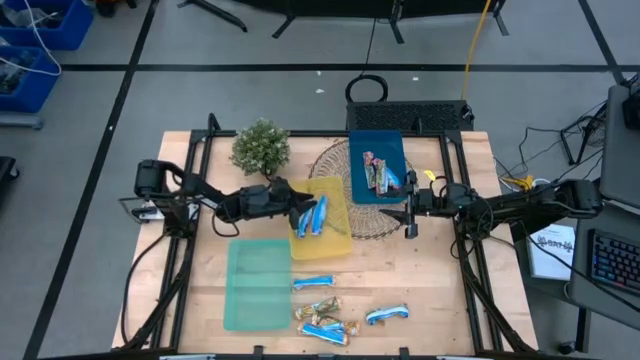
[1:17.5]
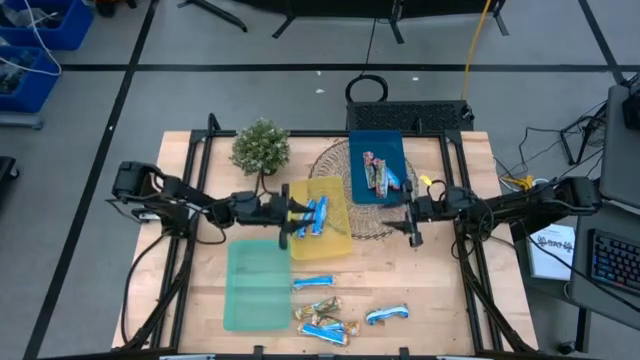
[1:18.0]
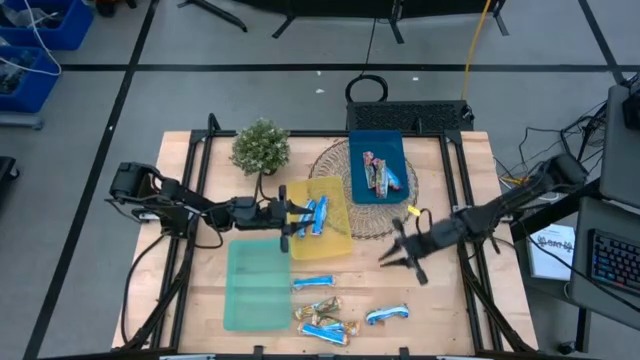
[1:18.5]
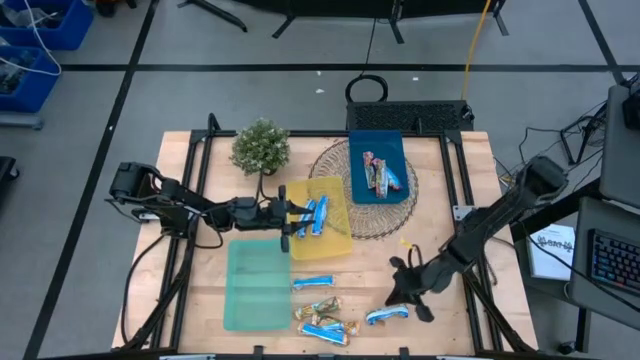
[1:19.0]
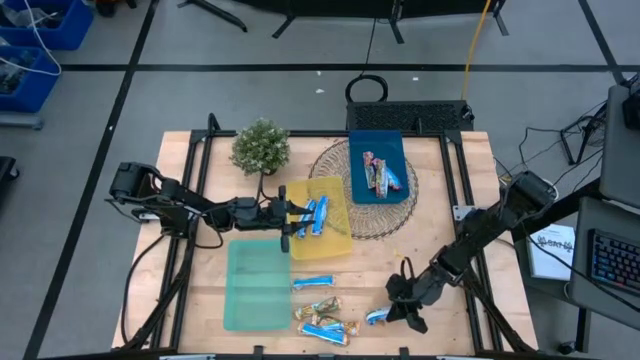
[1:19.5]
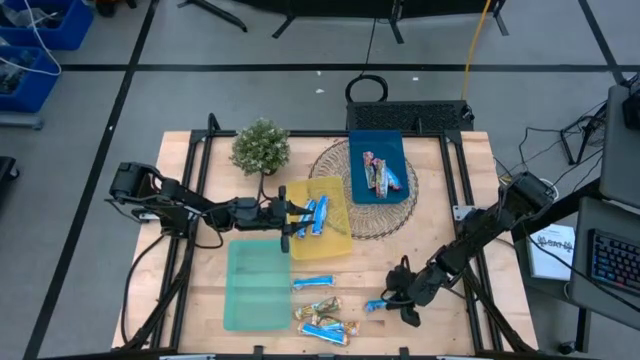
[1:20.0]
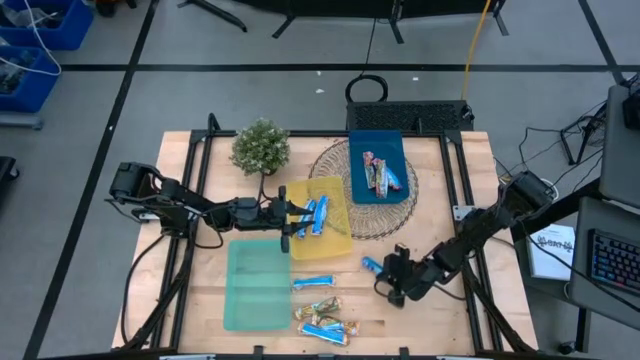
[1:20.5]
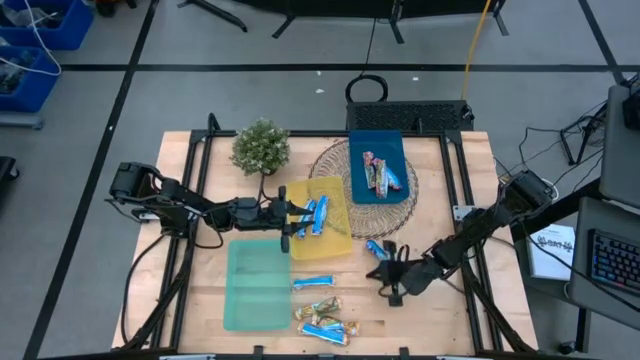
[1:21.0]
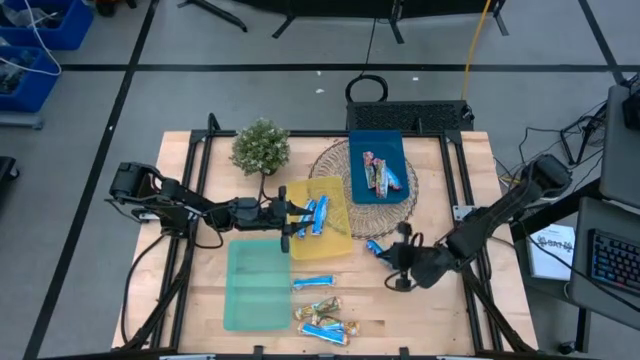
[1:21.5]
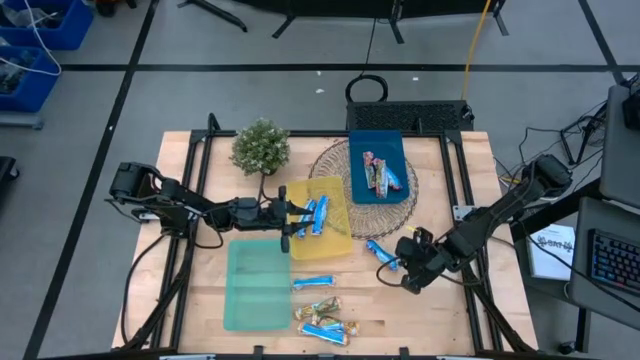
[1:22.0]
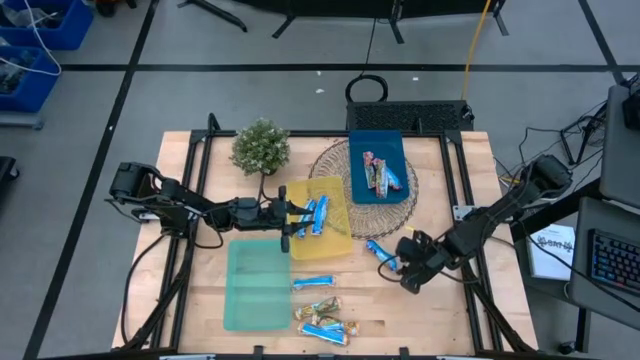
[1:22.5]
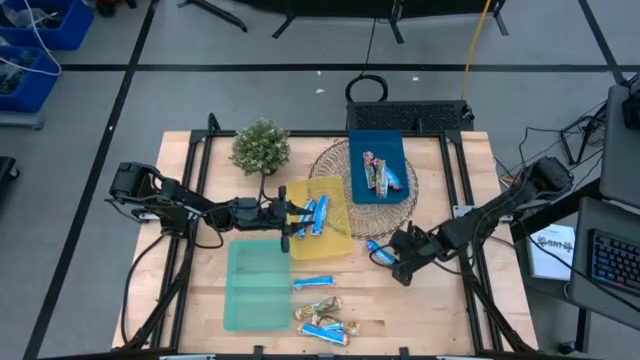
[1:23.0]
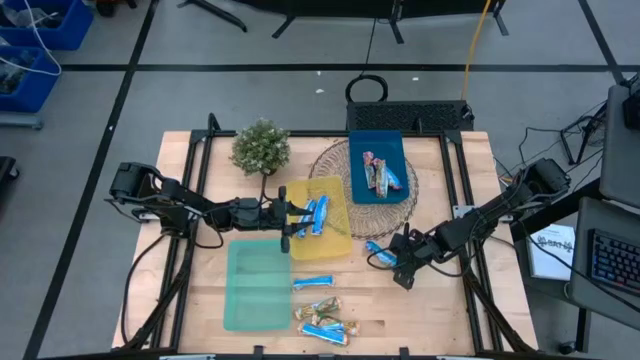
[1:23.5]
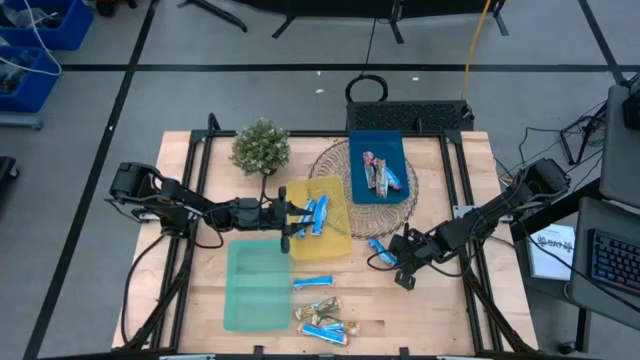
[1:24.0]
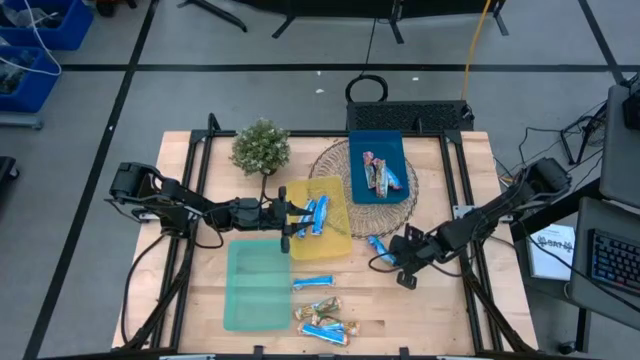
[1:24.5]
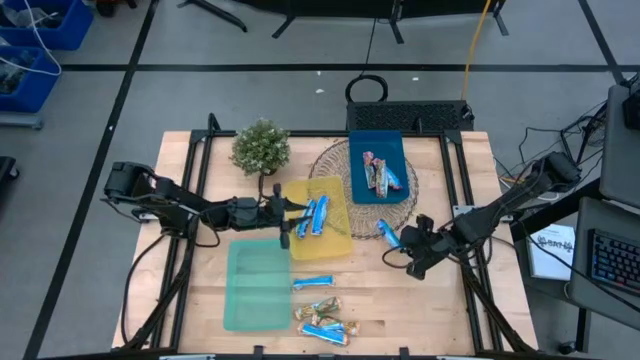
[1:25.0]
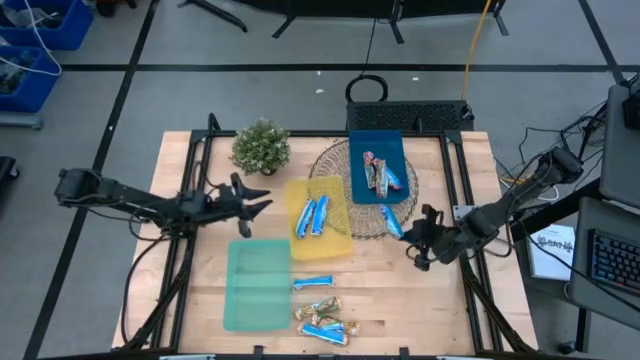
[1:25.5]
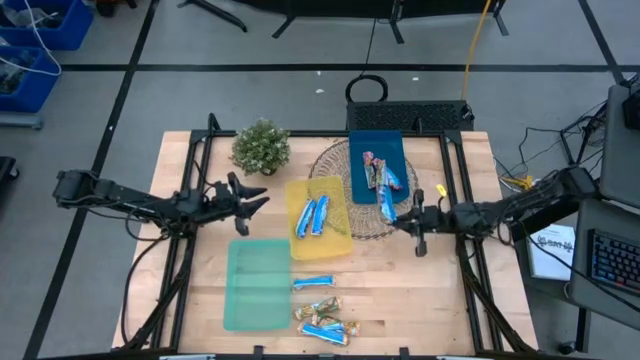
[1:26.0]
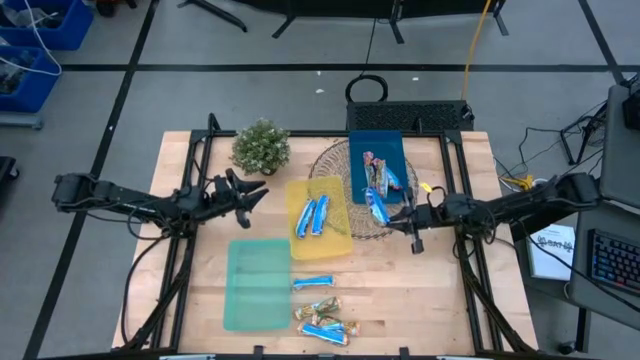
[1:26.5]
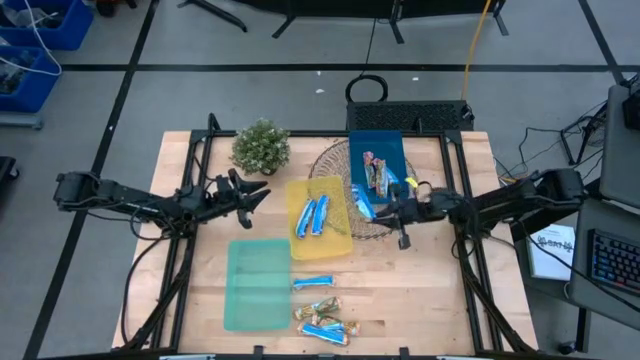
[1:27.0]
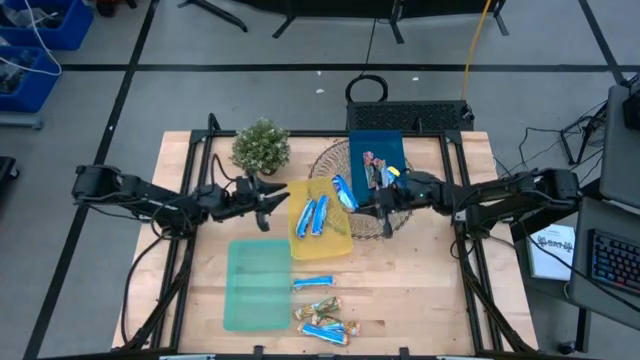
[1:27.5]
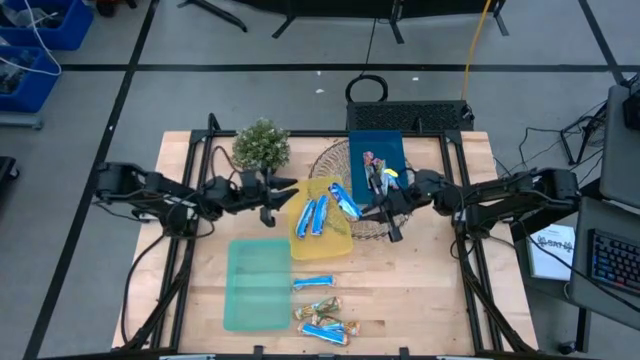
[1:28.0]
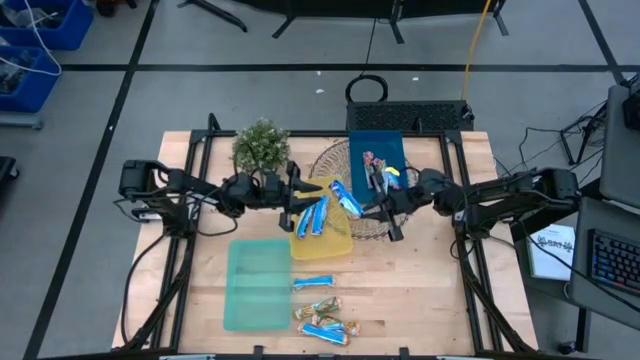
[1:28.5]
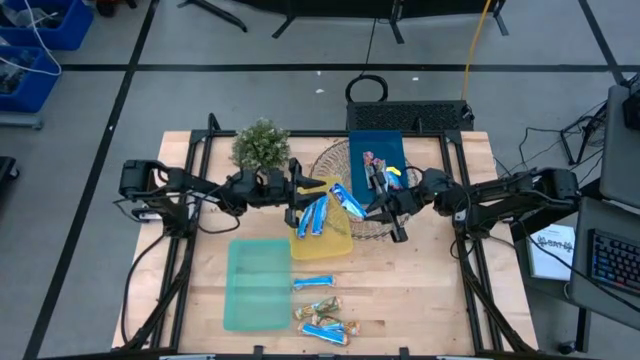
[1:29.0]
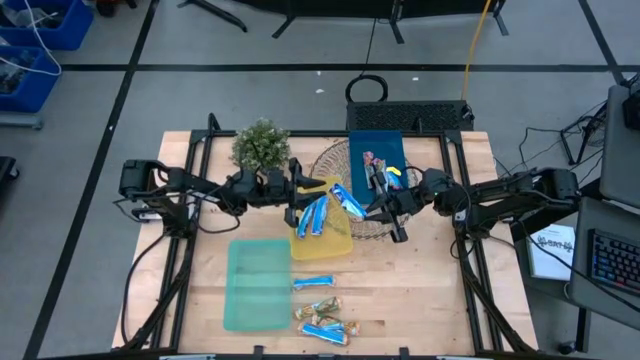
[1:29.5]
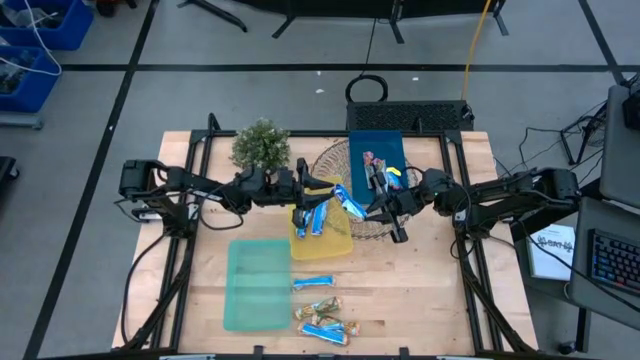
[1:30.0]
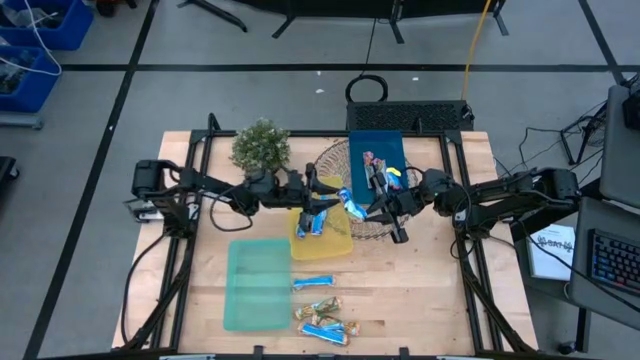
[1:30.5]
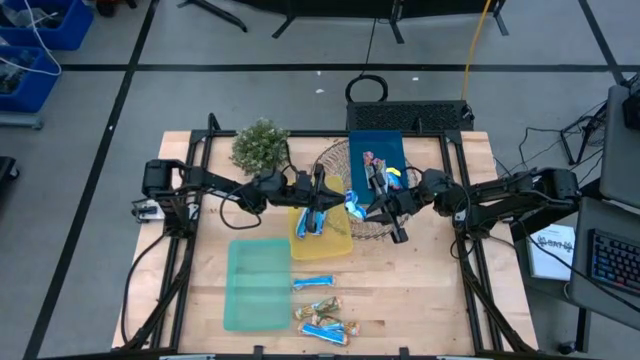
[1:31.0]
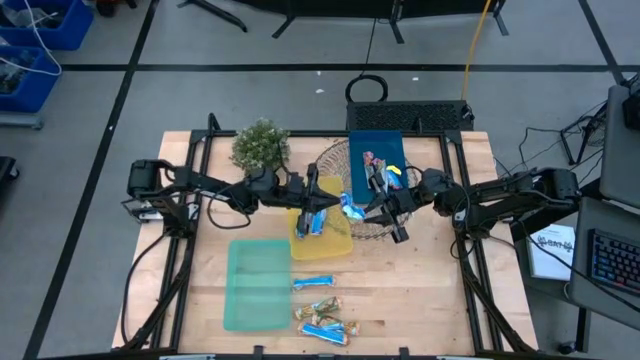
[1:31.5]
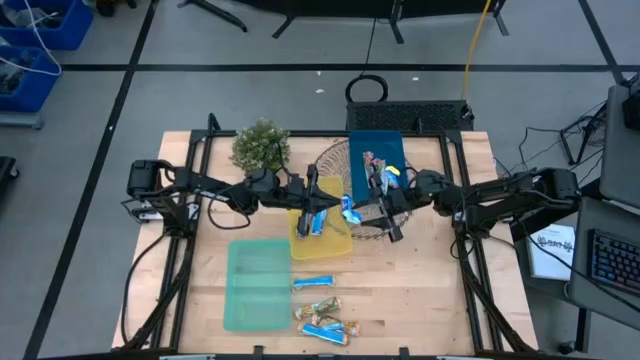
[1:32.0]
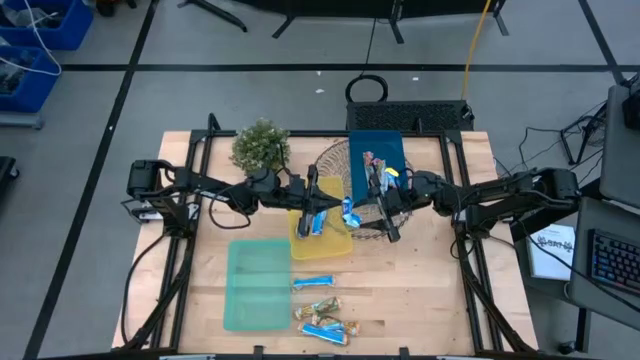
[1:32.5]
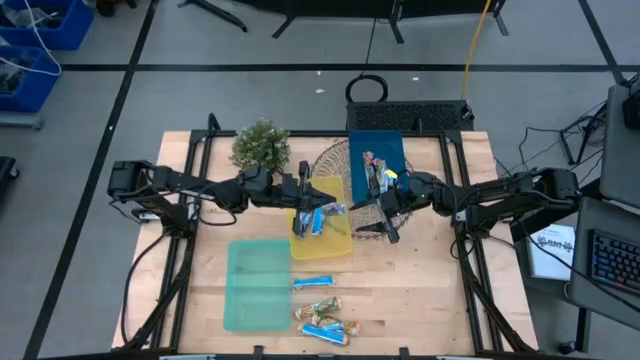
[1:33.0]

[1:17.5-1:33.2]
Task: Pick and place Granola Bars by type
Put the blue granola bar into the yellow bin

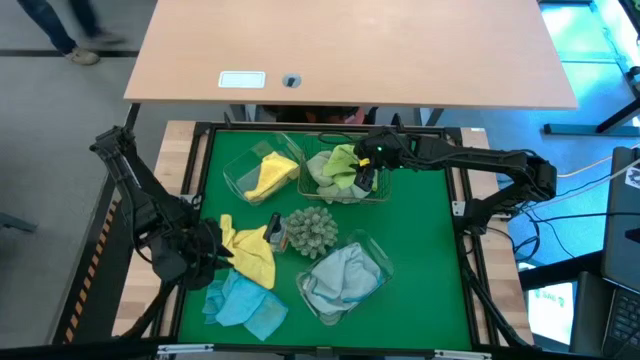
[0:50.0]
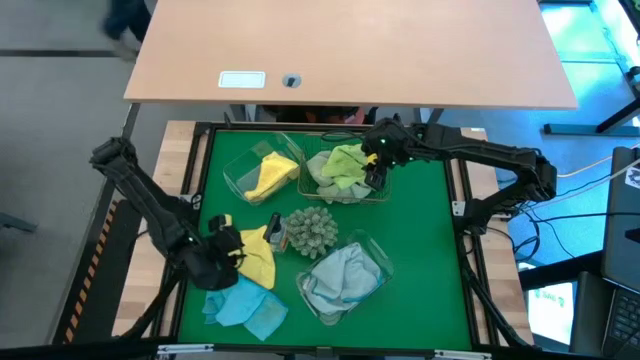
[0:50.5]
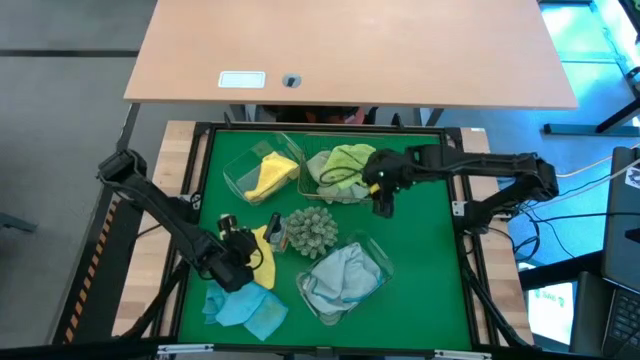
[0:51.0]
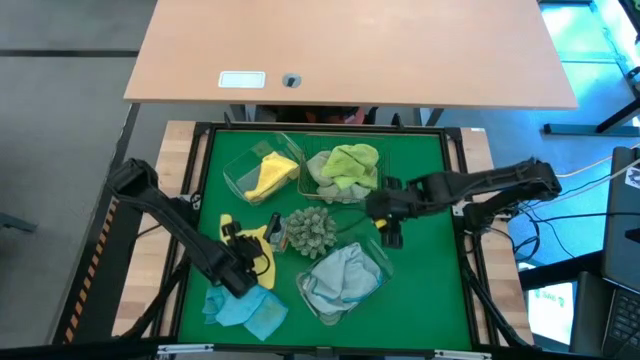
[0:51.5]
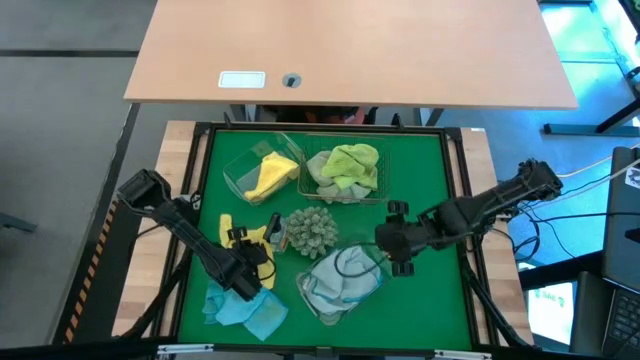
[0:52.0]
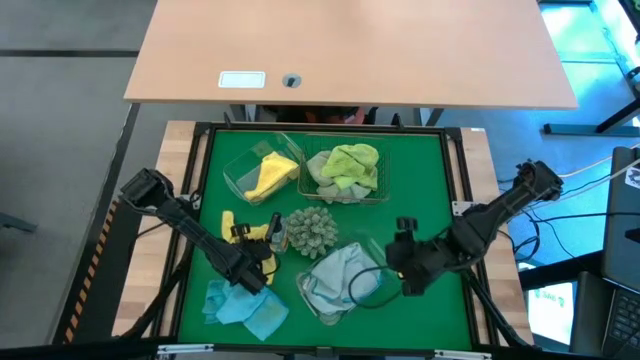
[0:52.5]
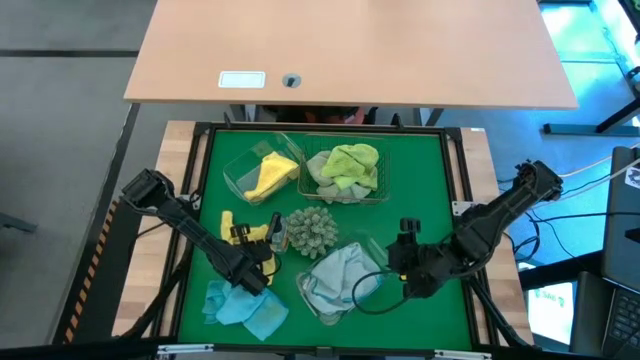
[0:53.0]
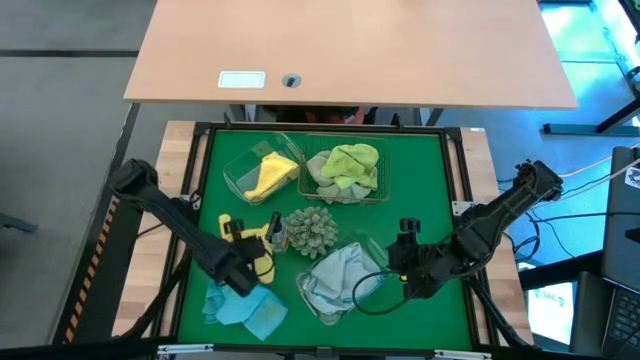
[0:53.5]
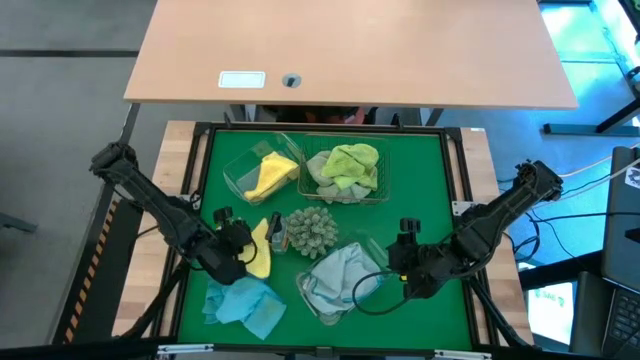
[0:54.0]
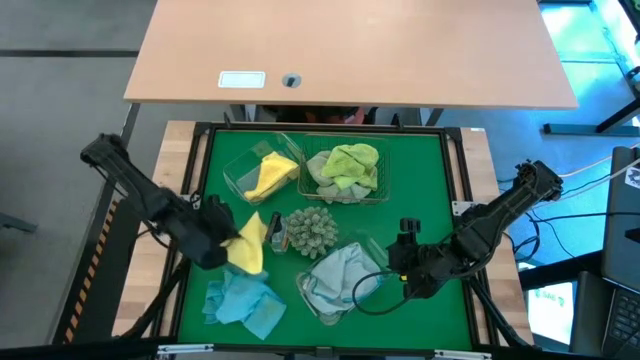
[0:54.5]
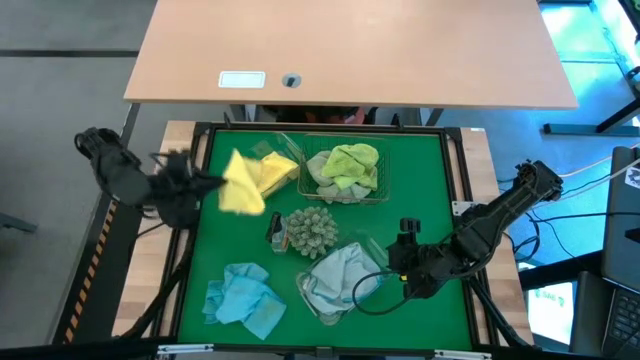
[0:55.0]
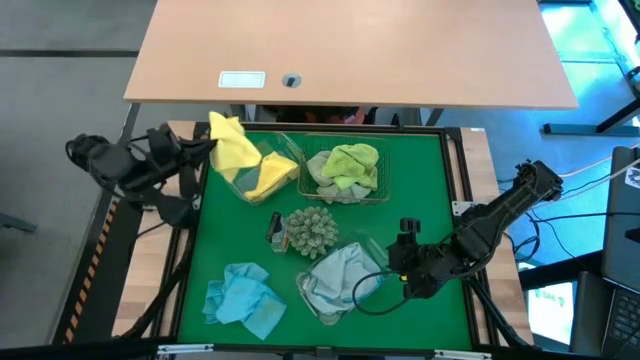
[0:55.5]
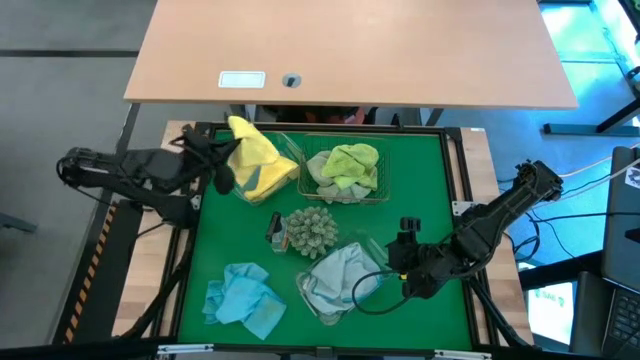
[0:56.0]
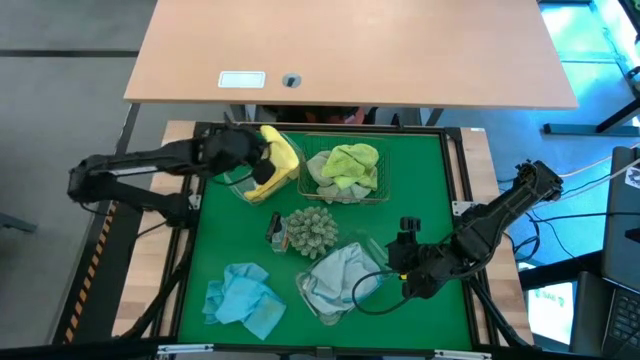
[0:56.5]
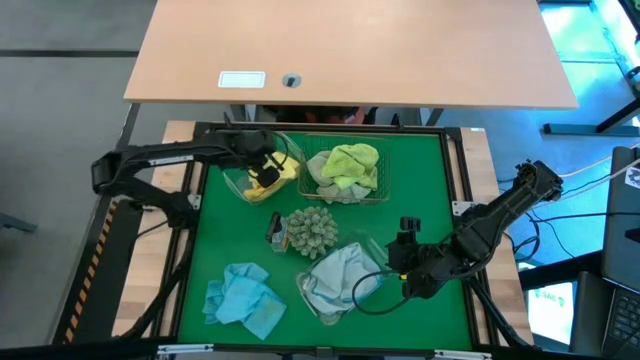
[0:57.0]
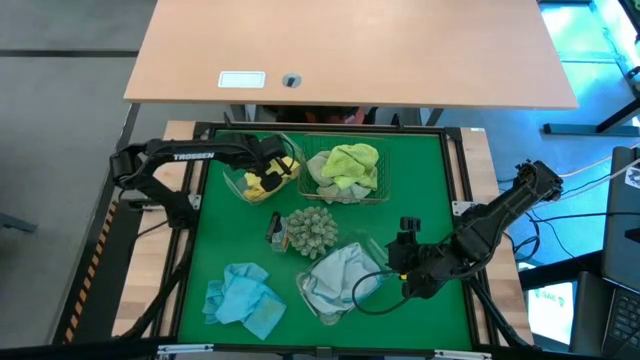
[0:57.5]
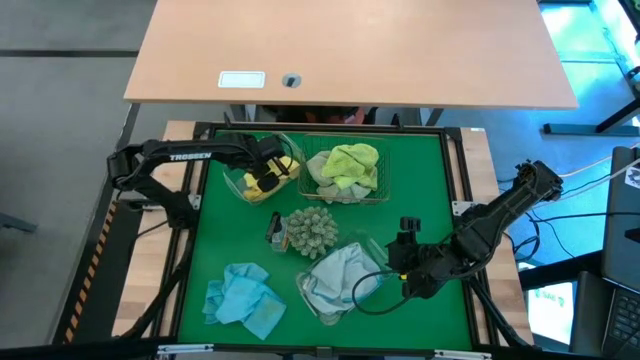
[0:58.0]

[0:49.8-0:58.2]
Task: Sort microfiber towel by color & place in baskets
Put the yellow microfiber towel into the top transparent bin
